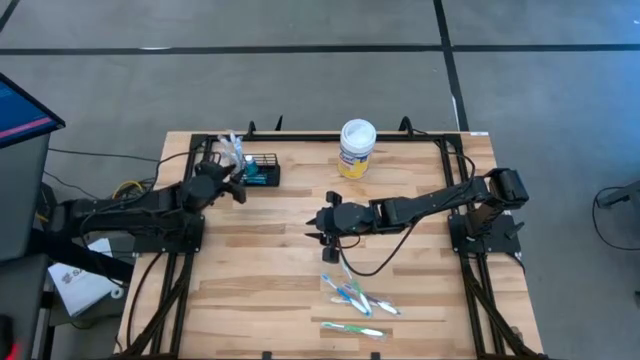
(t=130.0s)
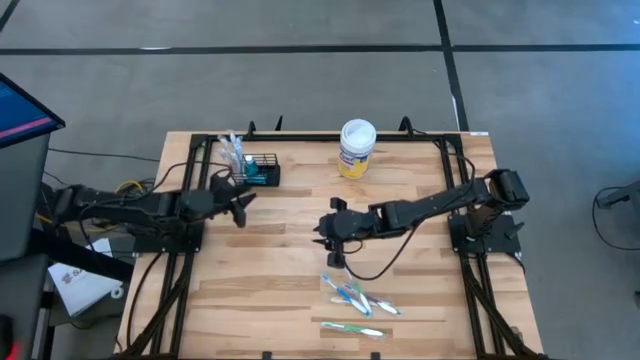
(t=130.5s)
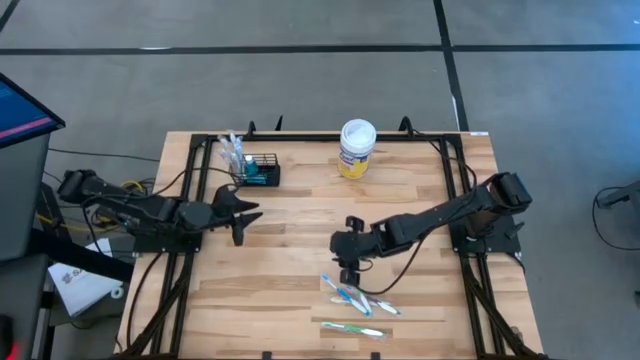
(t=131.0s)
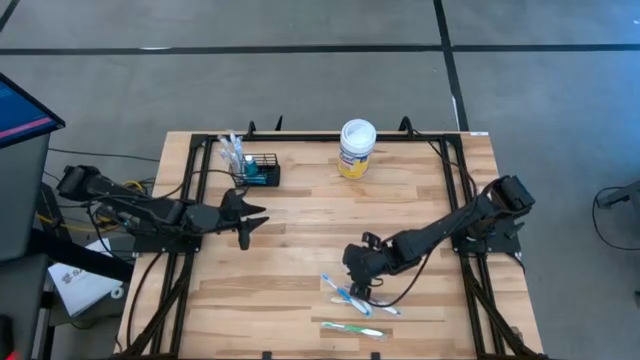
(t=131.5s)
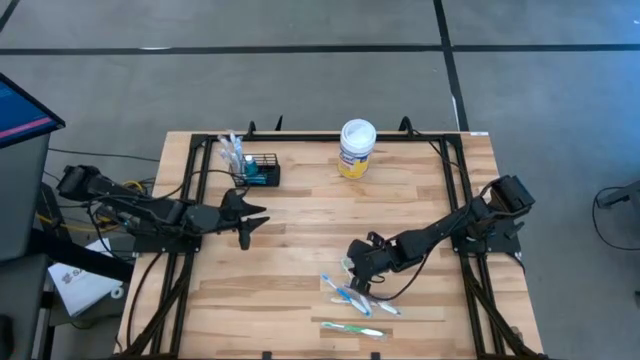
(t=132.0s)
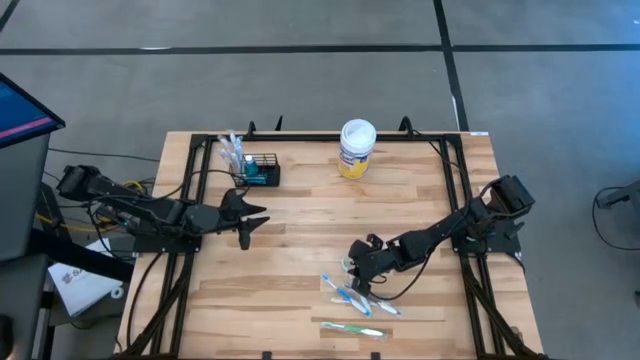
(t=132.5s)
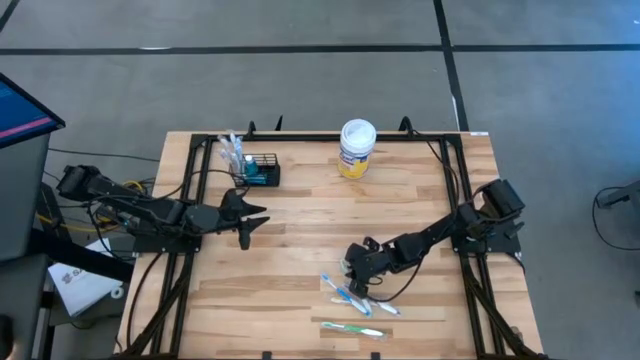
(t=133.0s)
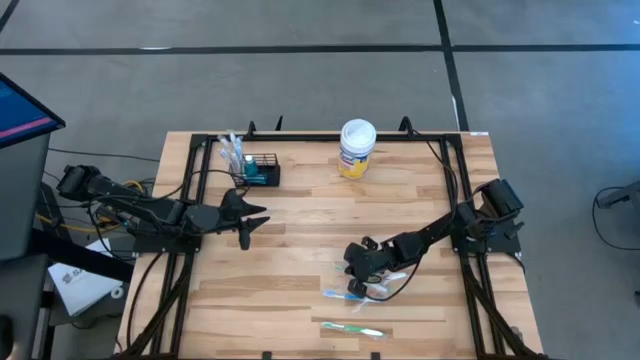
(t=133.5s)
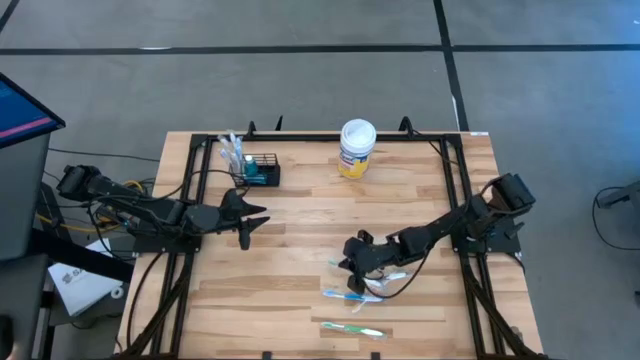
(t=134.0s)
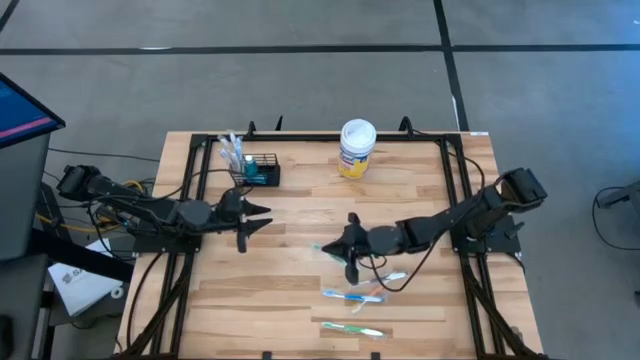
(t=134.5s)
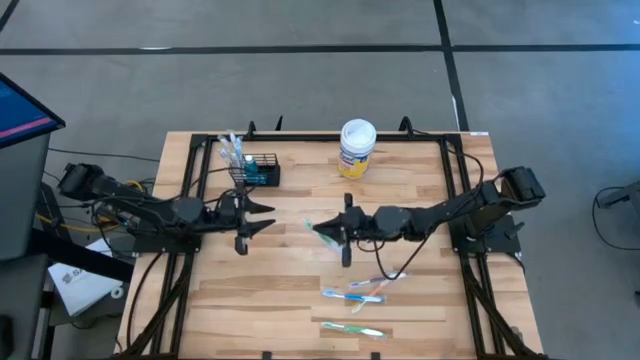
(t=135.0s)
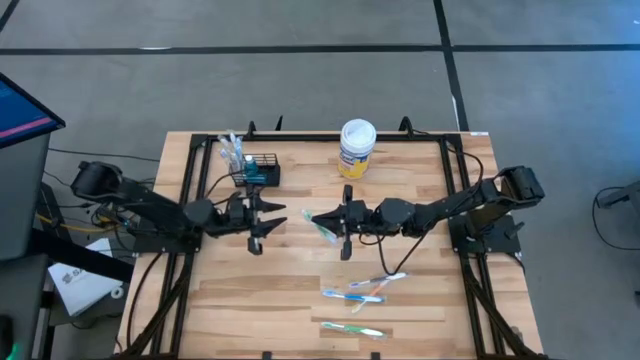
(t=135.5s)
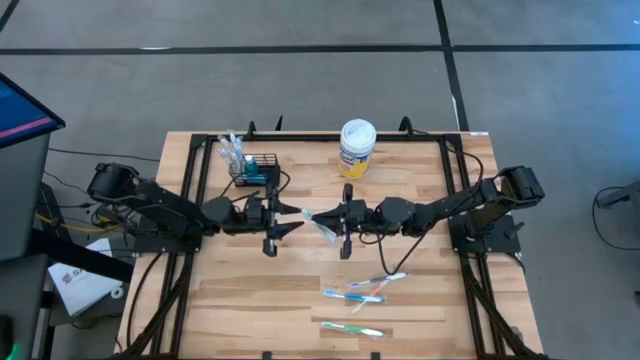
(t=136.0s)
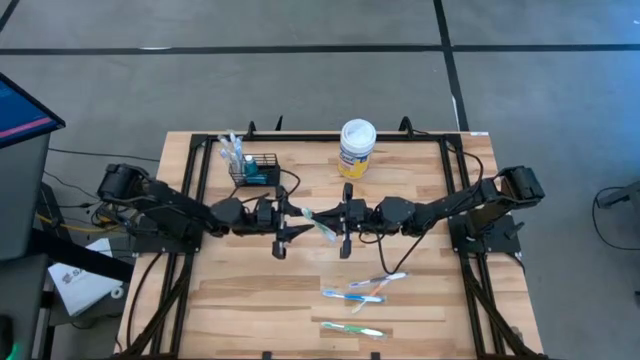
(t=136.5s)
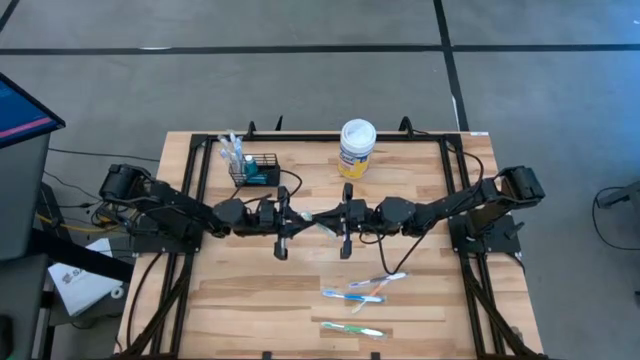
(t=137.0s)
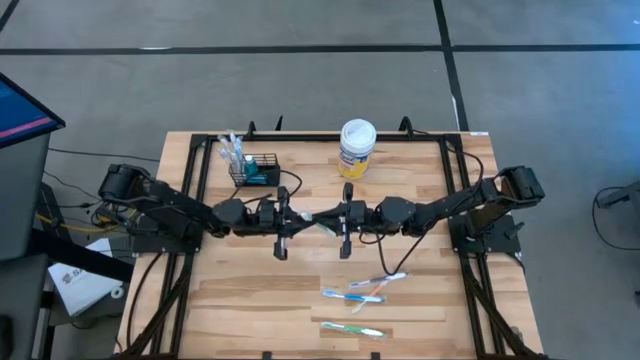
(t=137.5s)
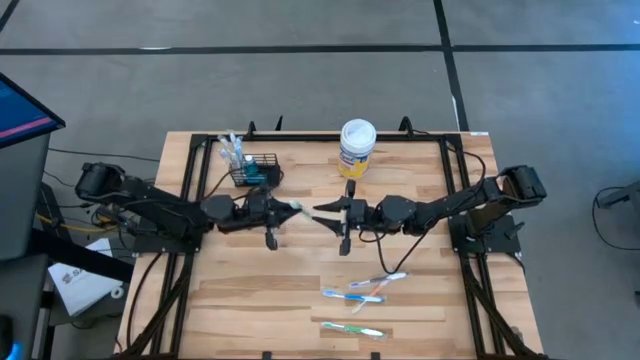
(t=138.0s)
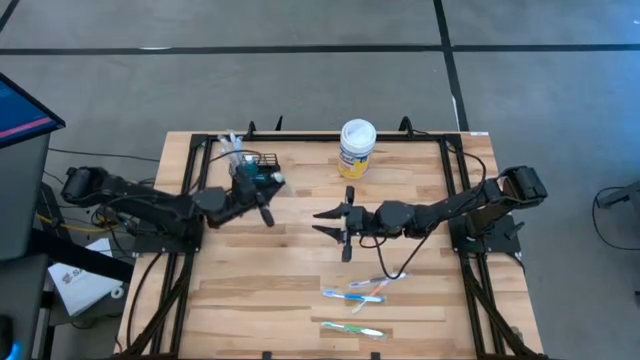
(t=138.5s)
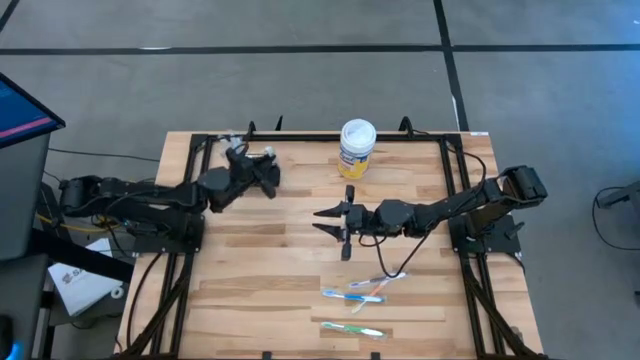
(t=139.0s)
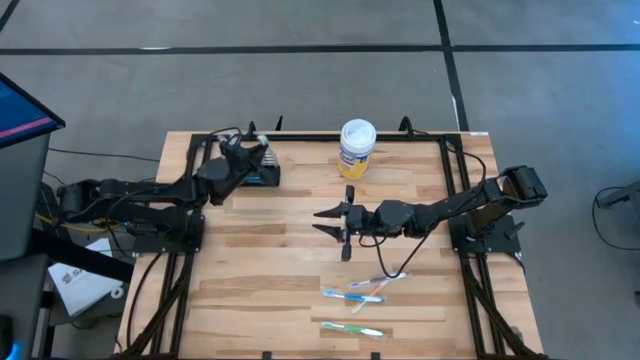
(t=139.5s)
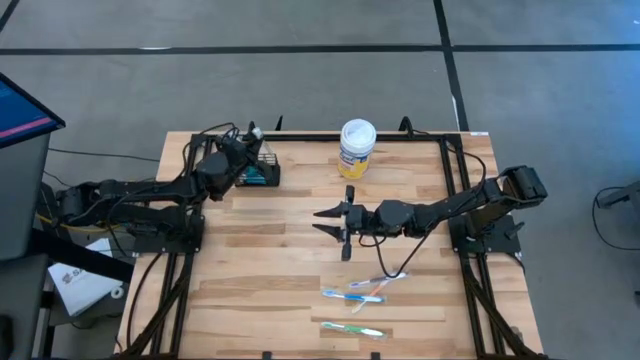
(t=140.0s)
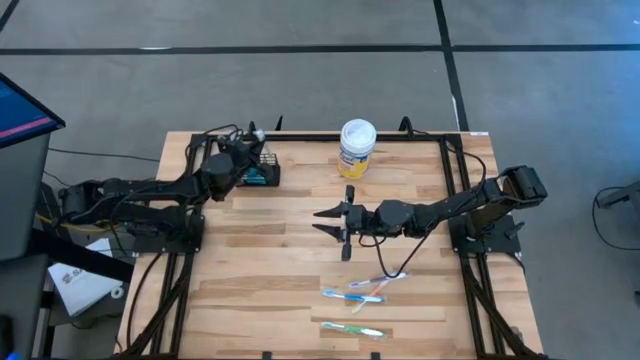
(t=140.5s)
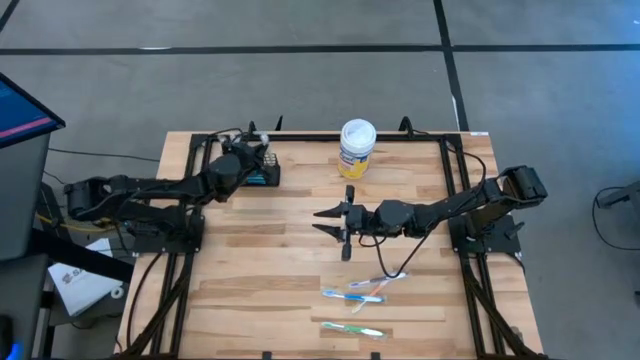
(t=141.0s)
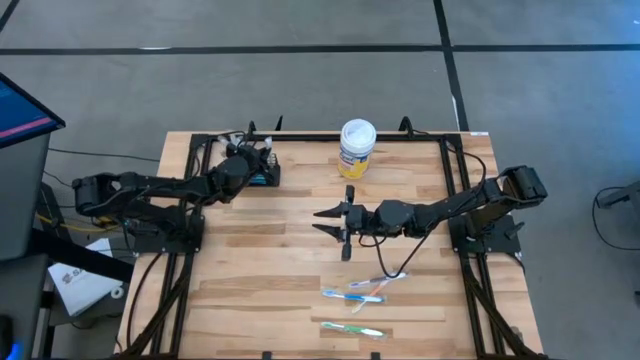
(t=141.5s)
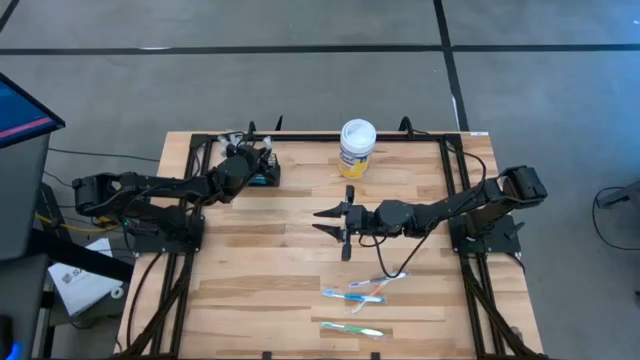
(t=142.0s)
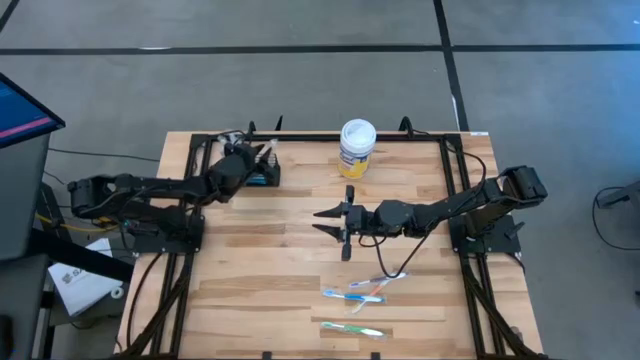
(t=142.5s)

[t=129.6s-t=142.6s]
Task: Pick & Place toothbrushing station
Put the top green toothbrush into the mesh organizer

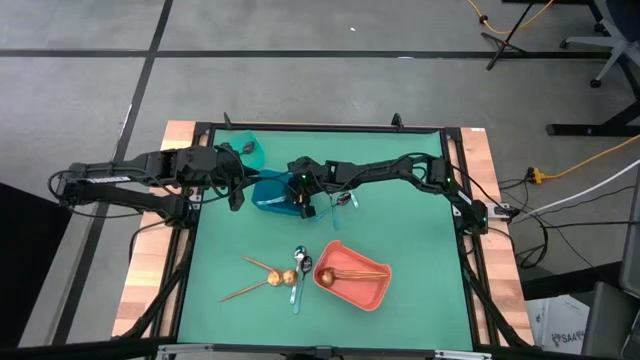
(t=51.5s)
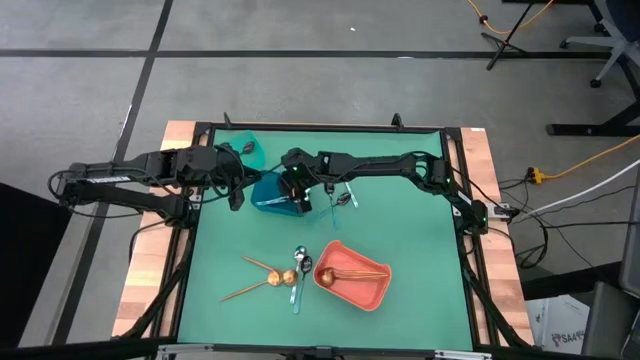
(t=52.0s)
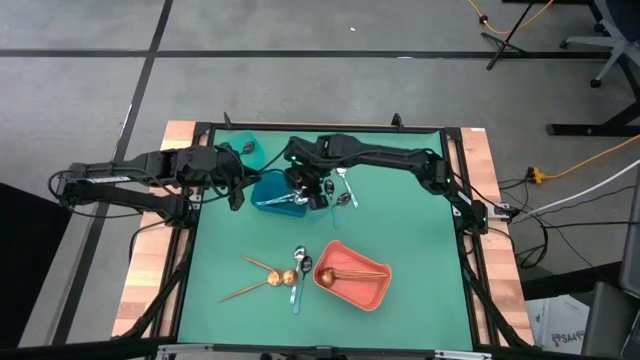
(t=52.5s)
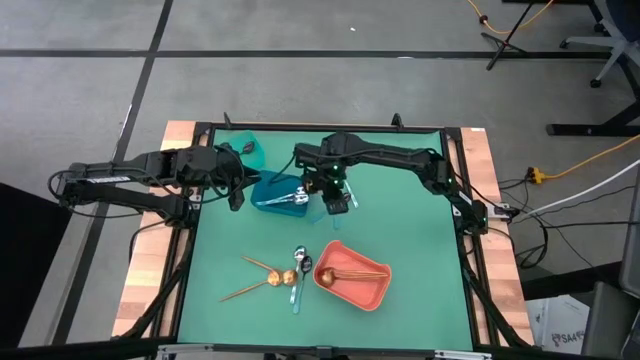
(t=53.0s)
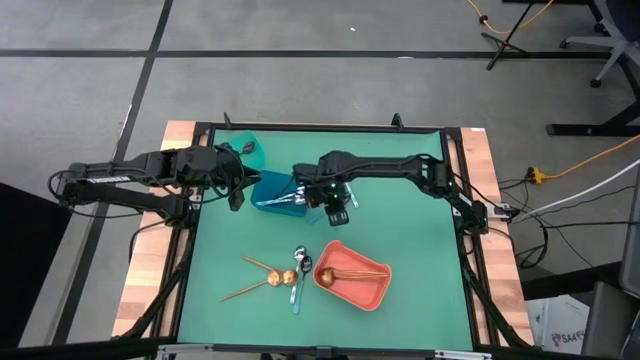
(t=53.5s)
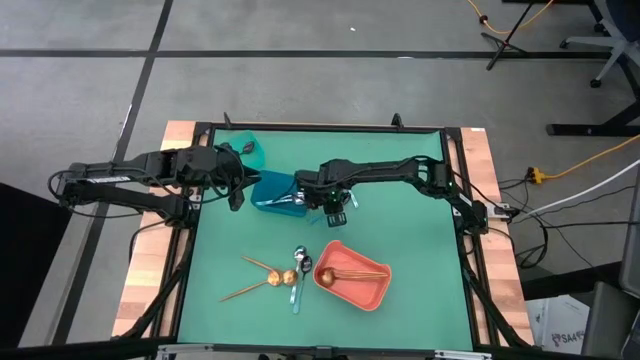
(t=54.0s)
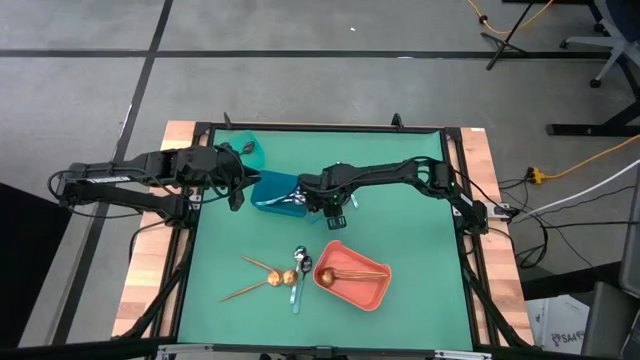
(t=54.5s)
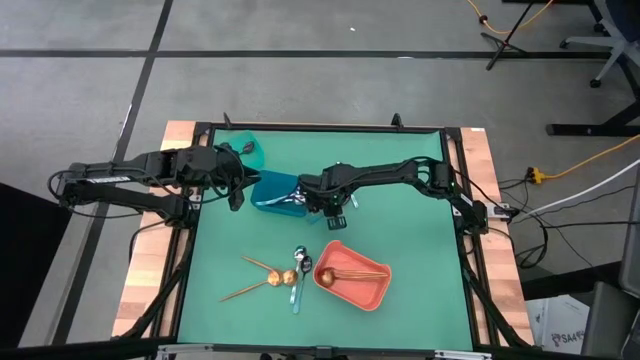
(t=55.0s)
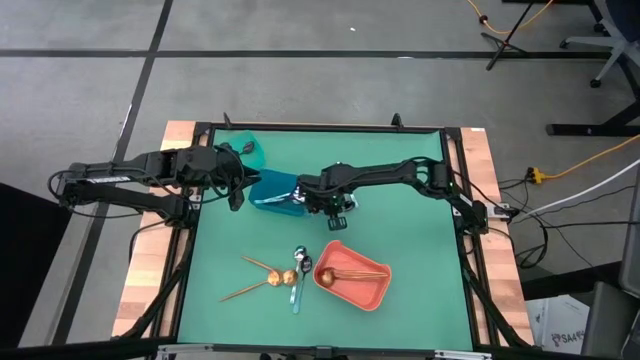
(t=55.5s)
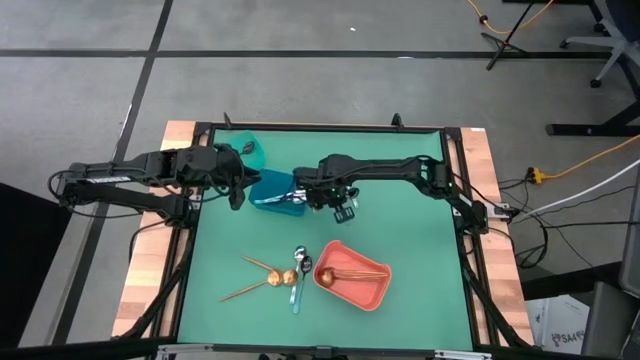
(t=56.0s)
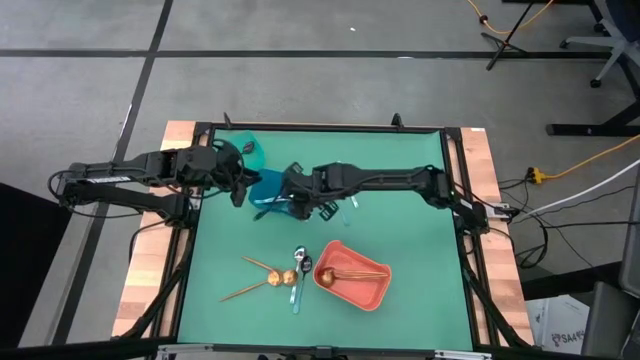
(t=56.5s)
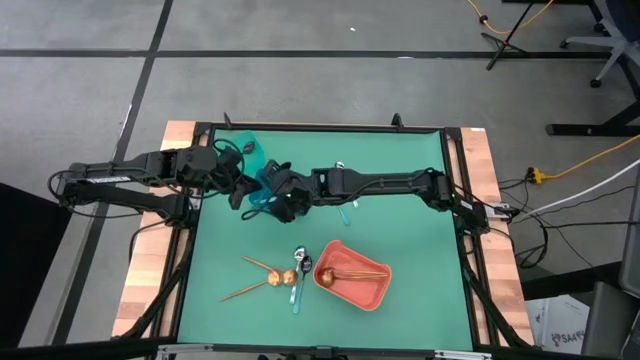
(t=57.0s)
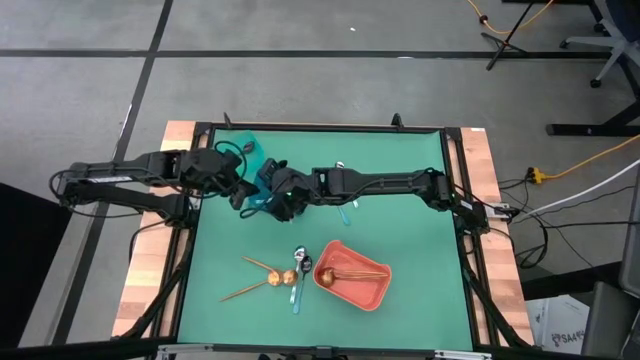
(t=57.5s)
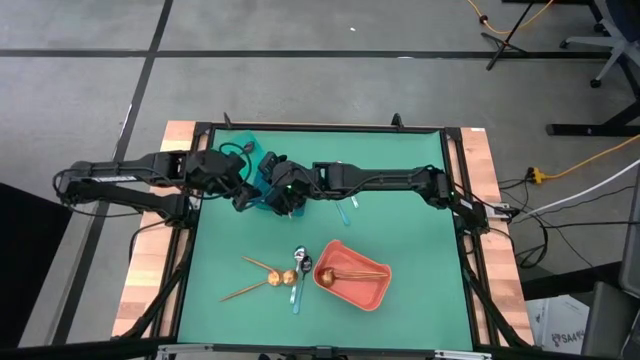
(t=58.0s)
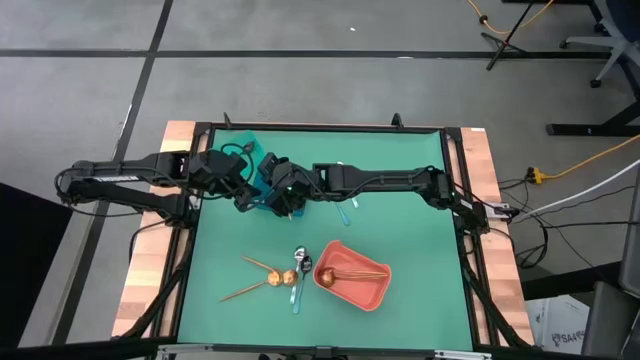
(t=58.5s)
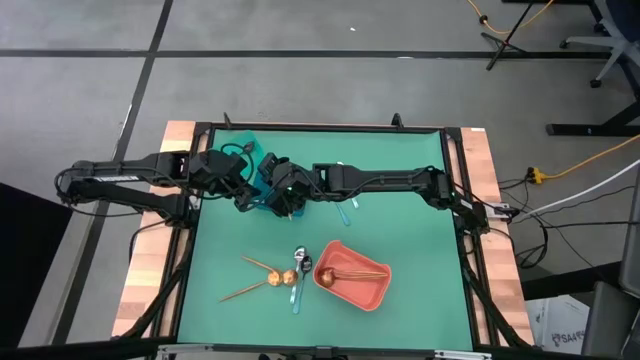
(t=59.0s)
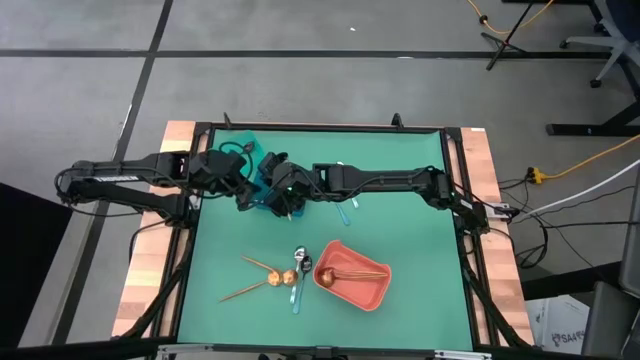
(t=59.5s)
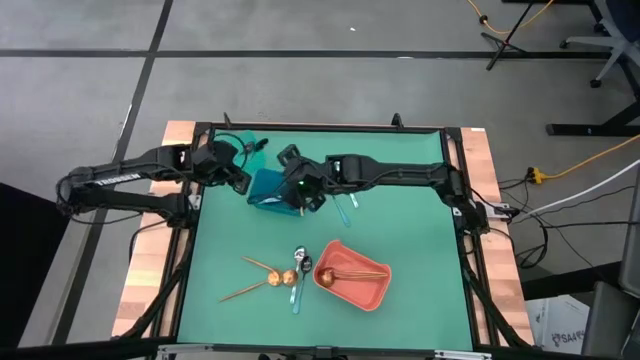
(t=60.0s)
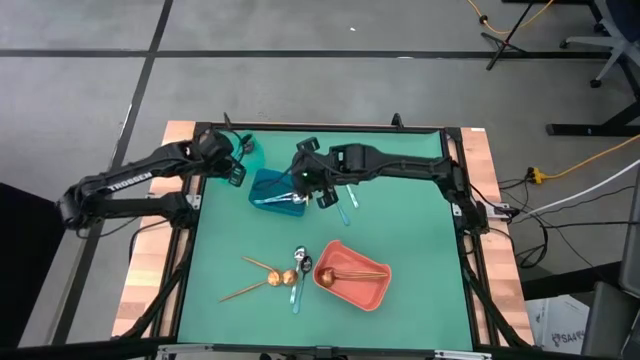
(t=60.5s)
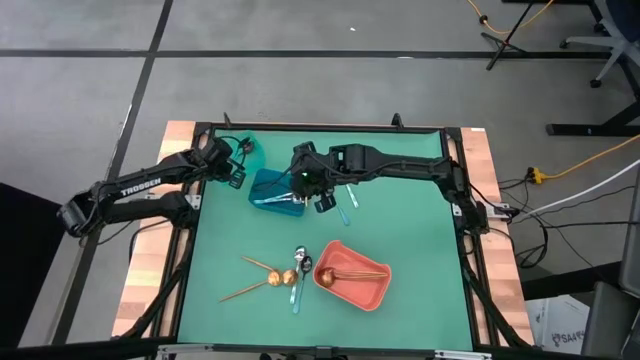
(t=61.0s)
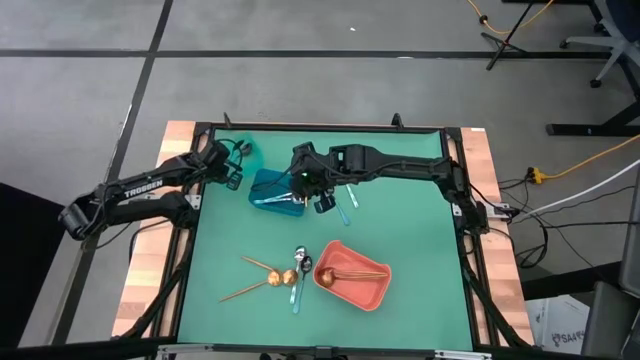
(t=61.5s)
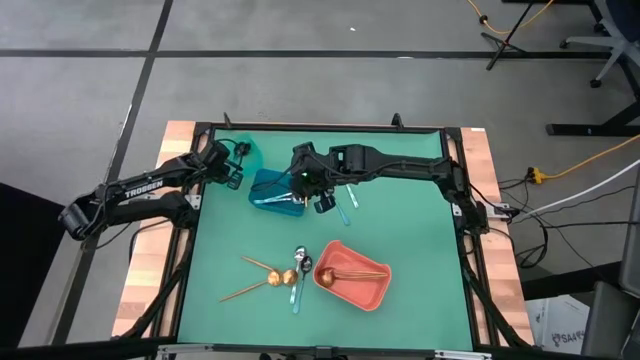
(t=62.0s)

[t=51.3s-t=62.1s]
Task: Sort silverware by color (type)
Put the blue spoon into the transparent green bin
